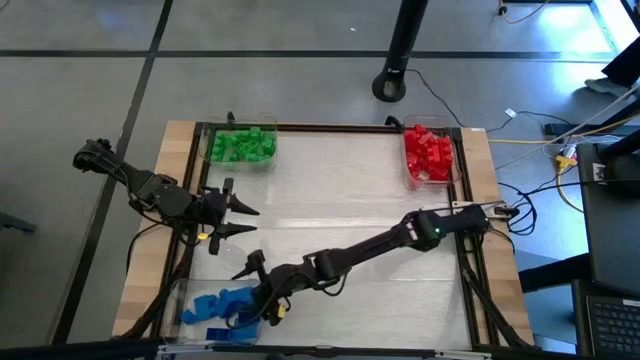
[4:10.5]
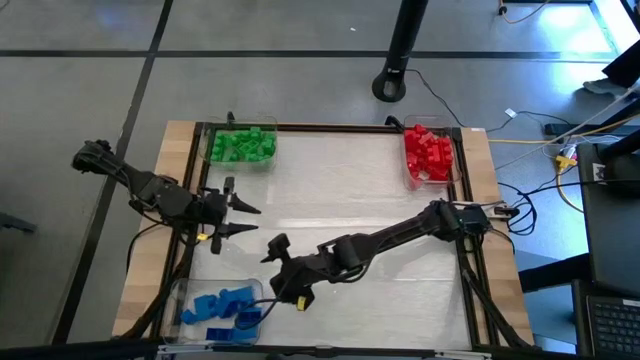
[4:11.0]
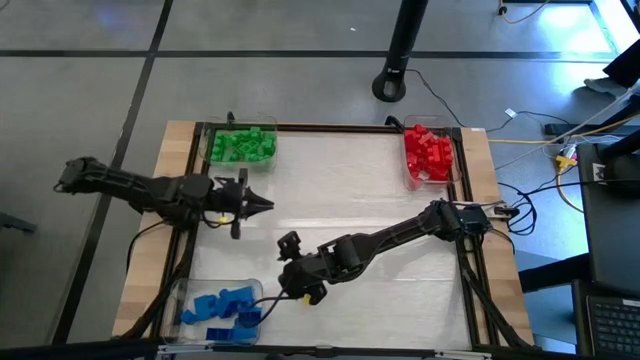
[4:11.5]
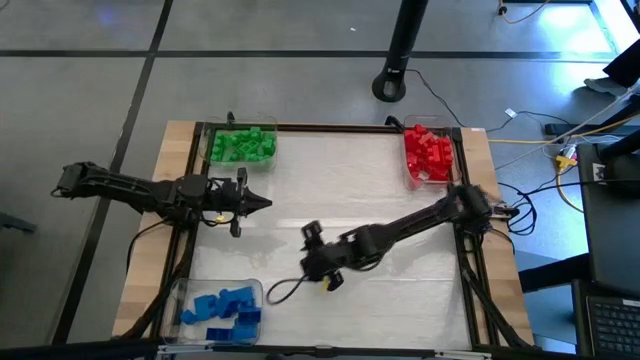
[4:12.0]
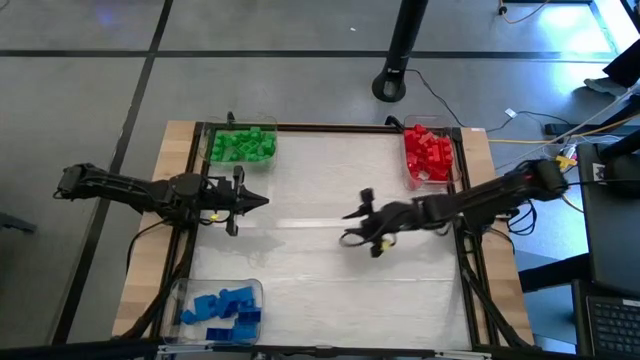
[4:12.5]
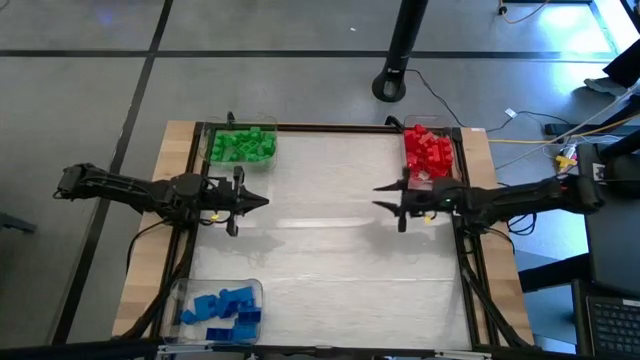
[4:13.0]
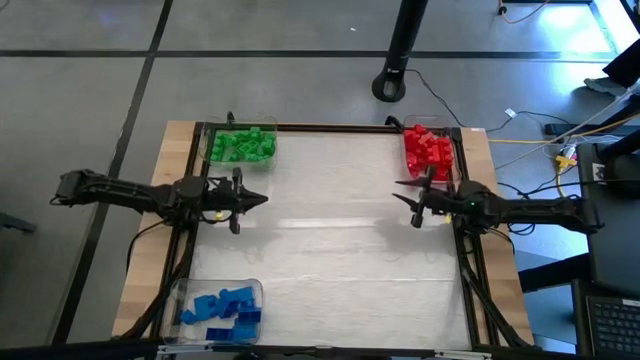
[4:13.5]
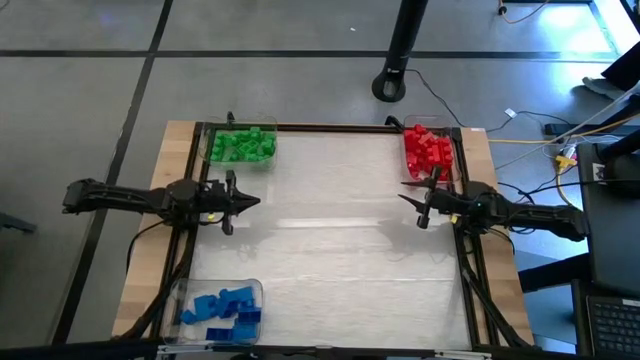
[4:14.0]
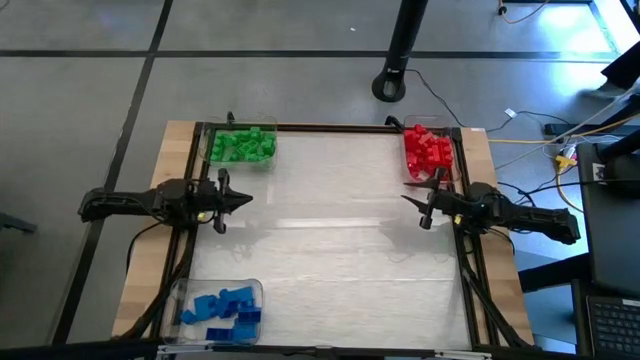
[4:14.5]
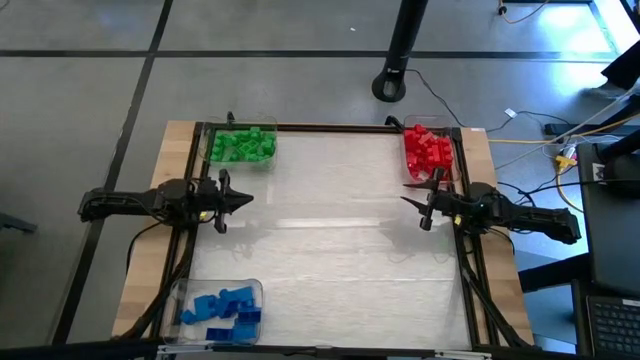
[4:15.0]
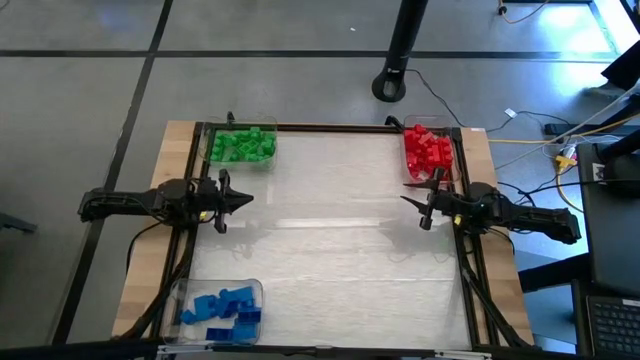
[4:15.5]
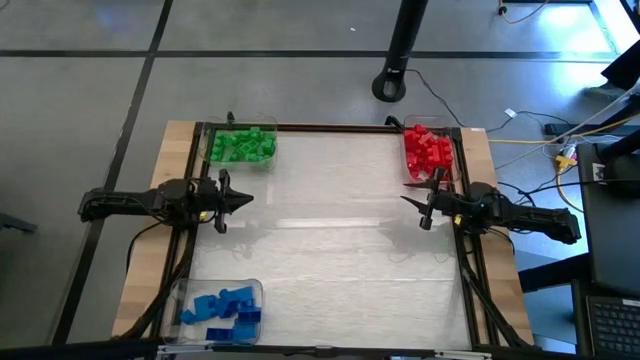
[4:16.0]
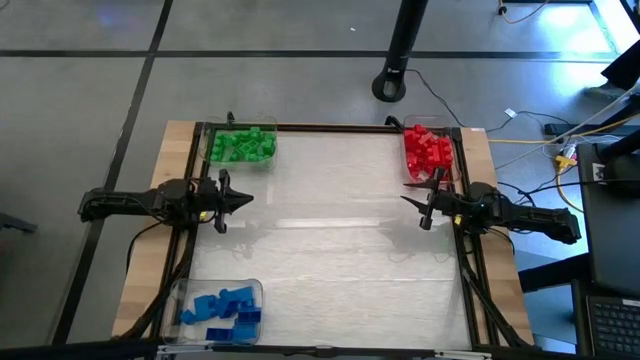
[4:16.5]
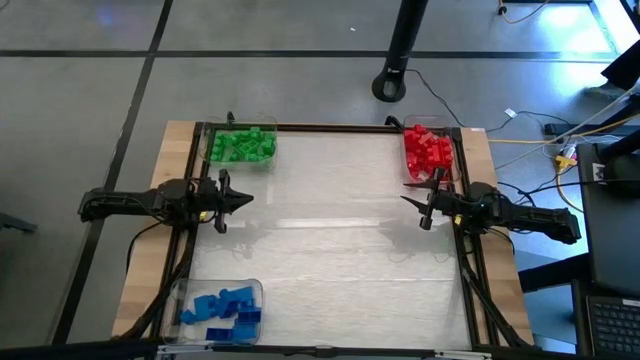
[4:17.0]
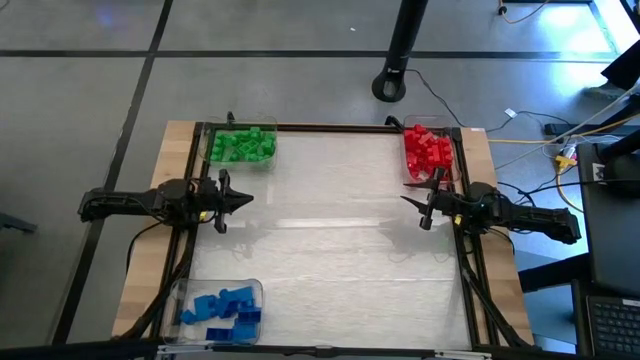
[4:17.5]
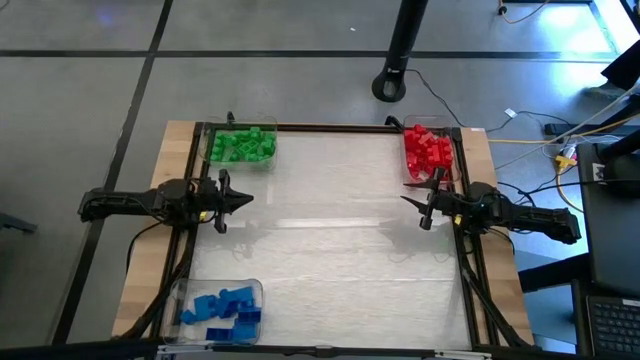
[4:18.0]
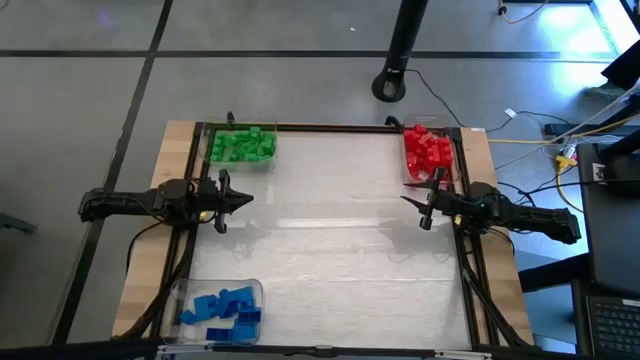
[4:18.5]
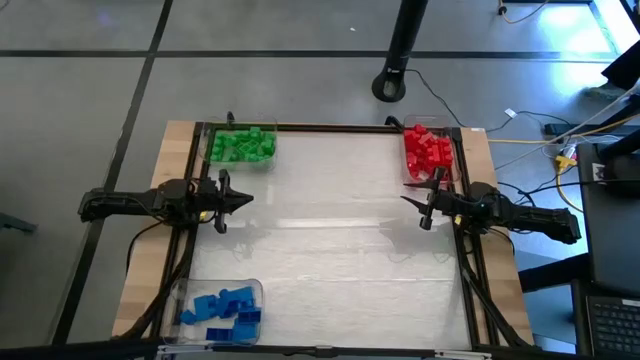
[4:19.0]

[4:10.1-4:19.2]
Task: Sort blocks
Return to Home Position

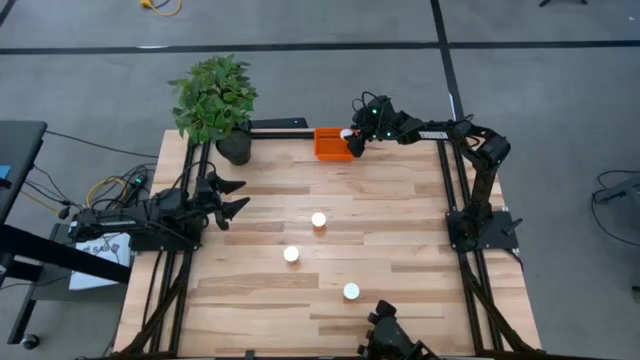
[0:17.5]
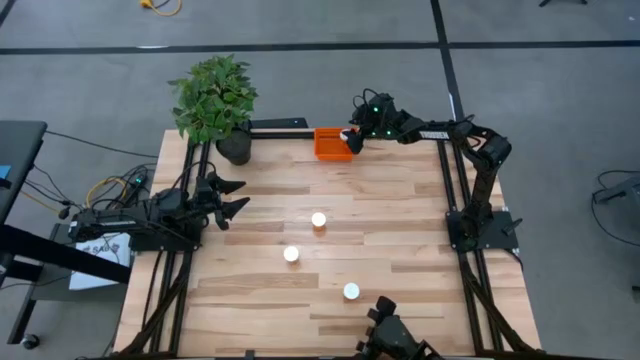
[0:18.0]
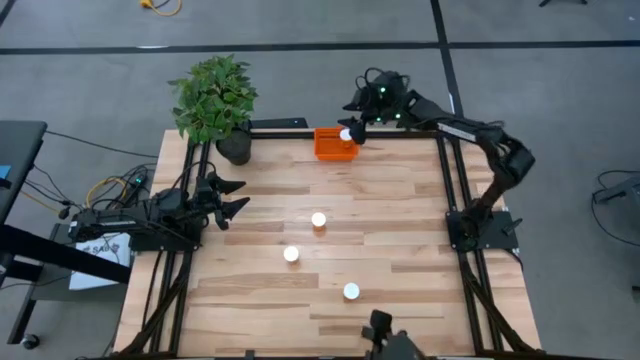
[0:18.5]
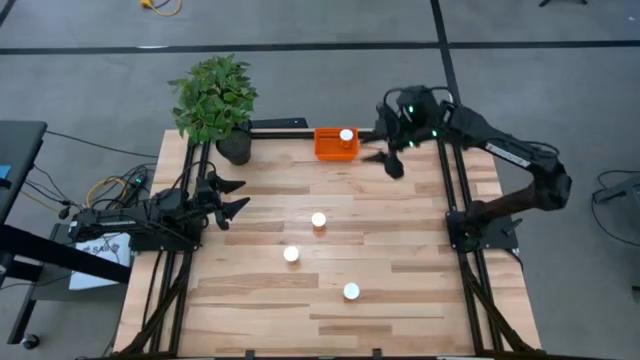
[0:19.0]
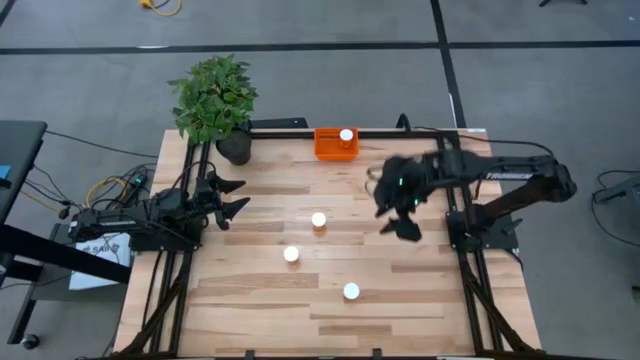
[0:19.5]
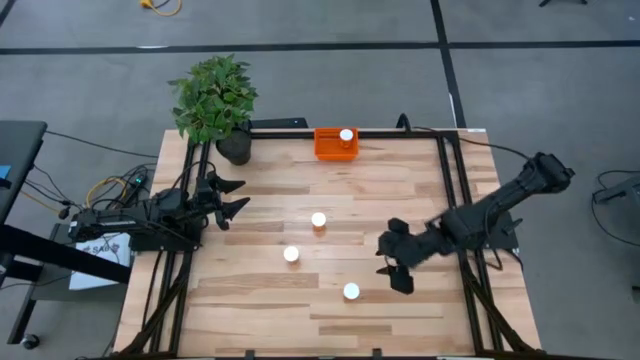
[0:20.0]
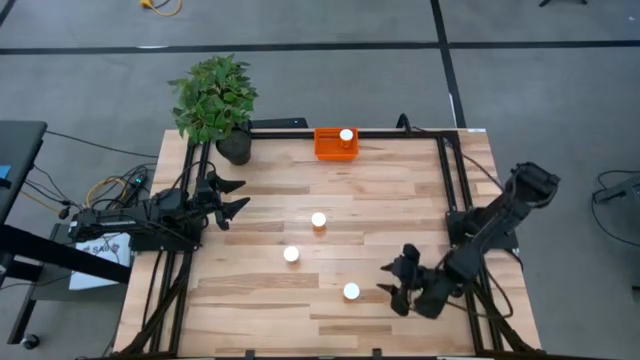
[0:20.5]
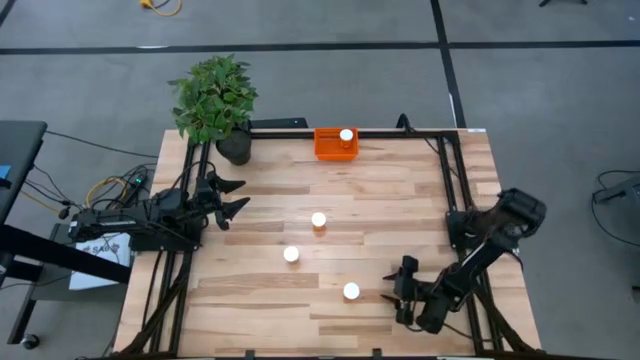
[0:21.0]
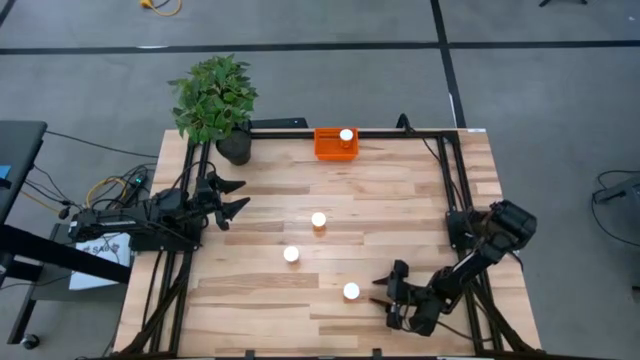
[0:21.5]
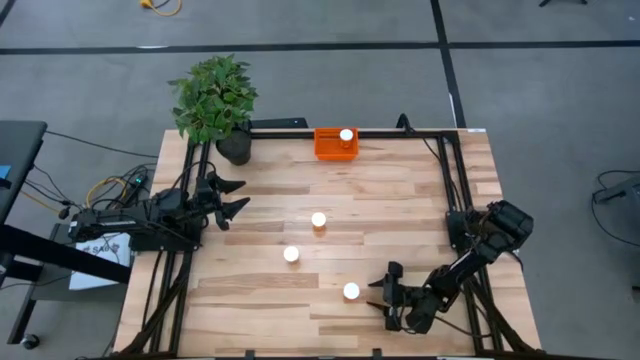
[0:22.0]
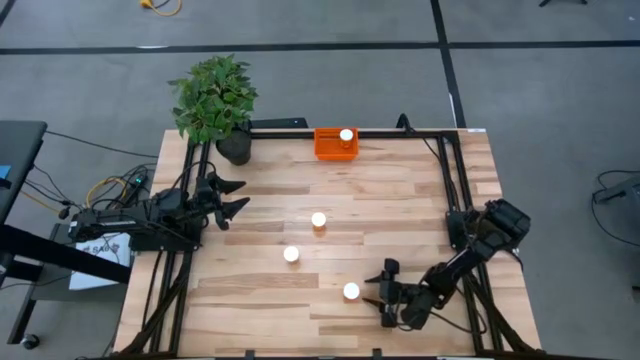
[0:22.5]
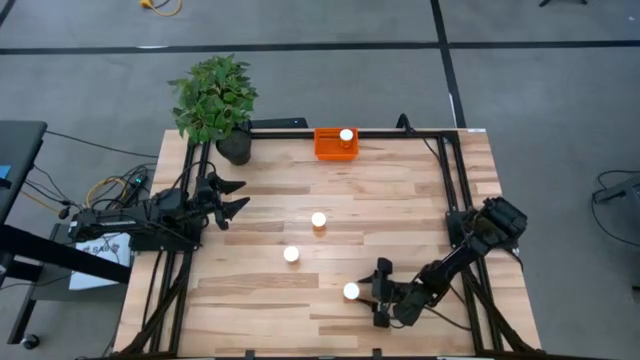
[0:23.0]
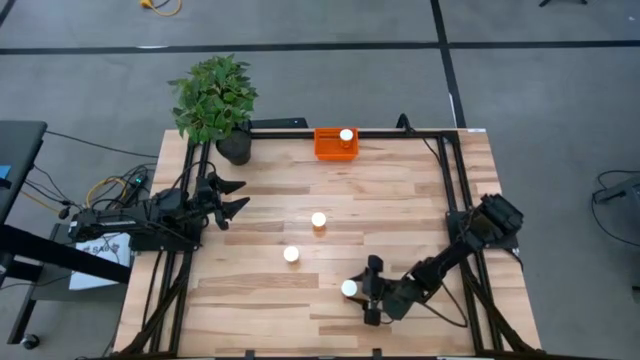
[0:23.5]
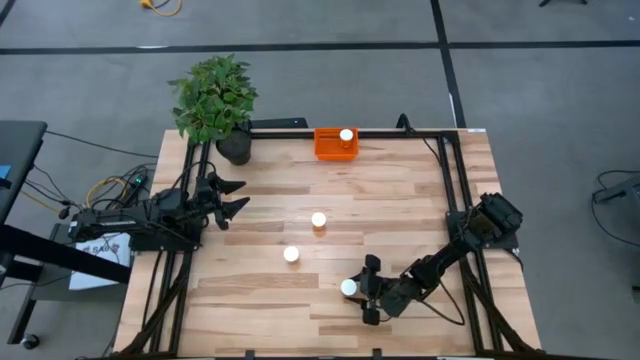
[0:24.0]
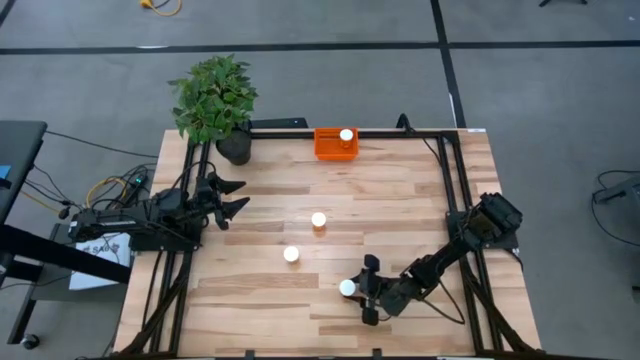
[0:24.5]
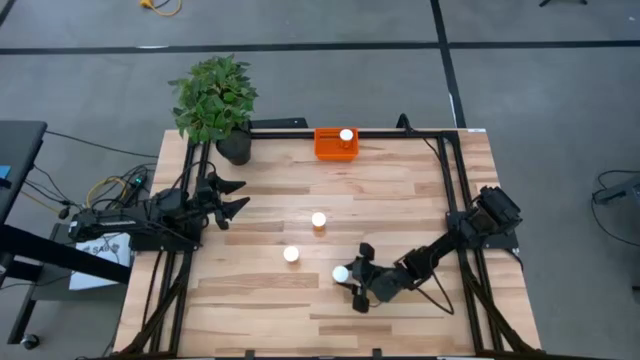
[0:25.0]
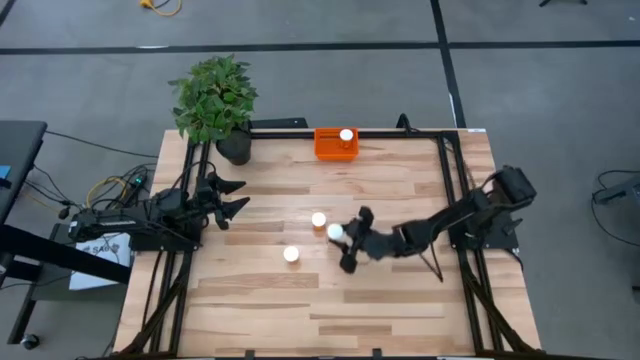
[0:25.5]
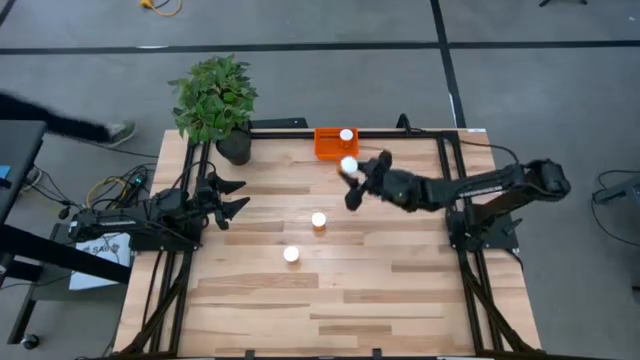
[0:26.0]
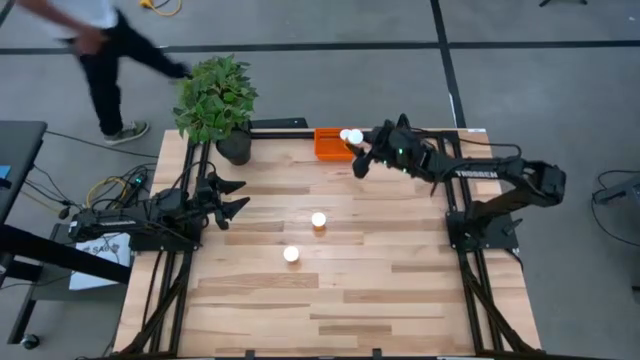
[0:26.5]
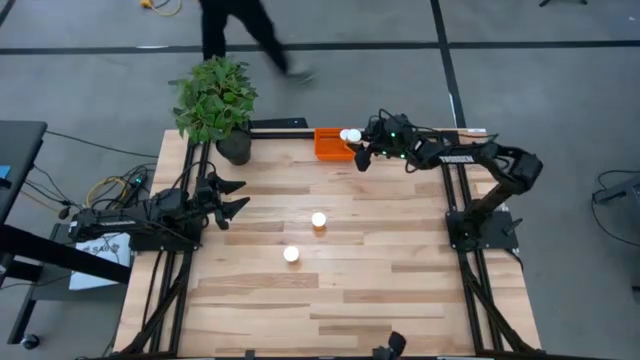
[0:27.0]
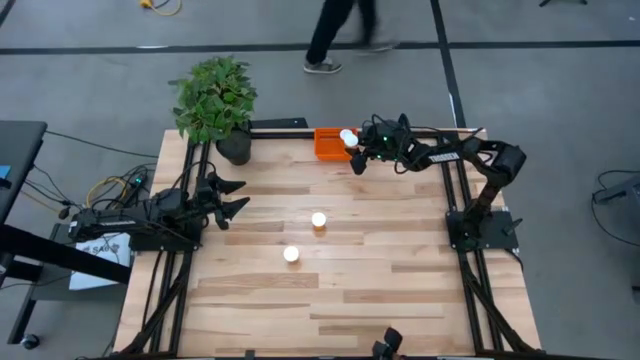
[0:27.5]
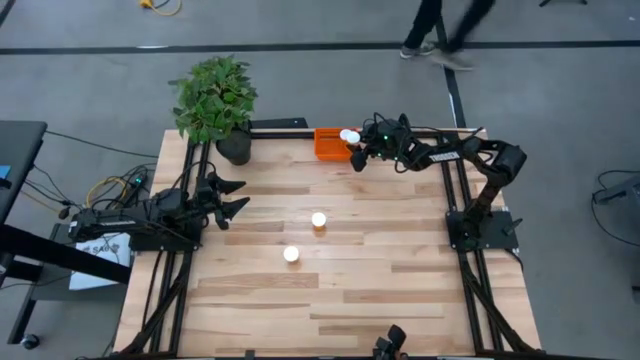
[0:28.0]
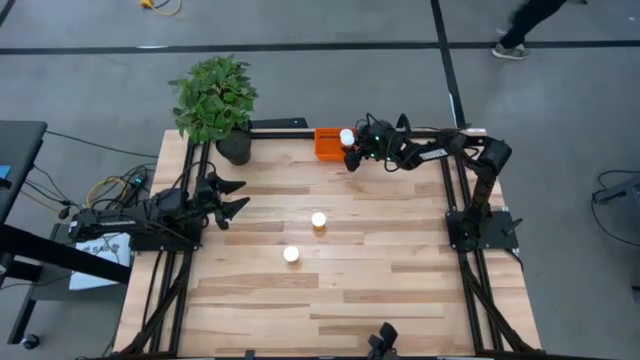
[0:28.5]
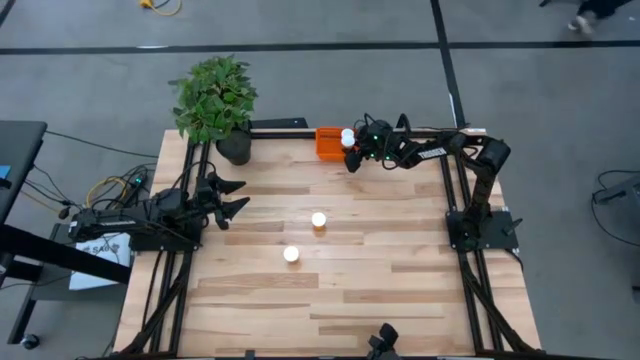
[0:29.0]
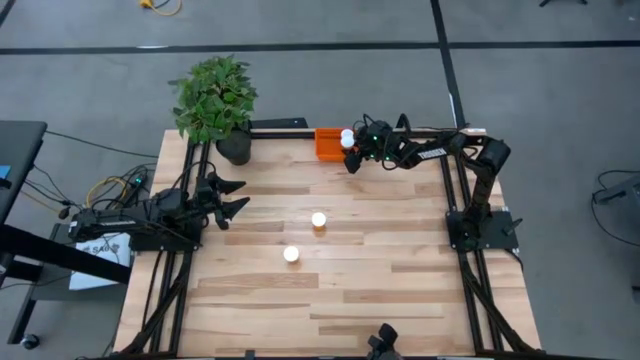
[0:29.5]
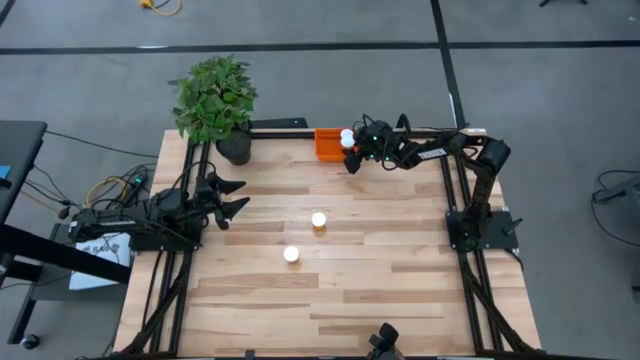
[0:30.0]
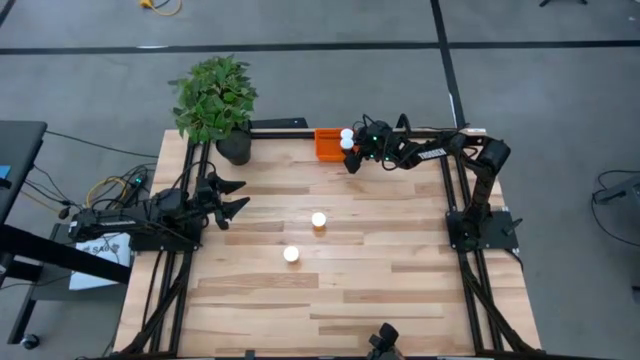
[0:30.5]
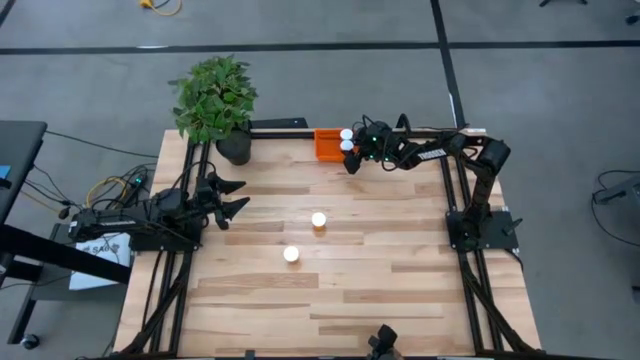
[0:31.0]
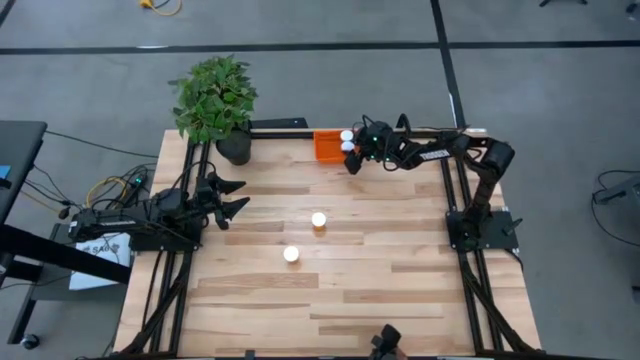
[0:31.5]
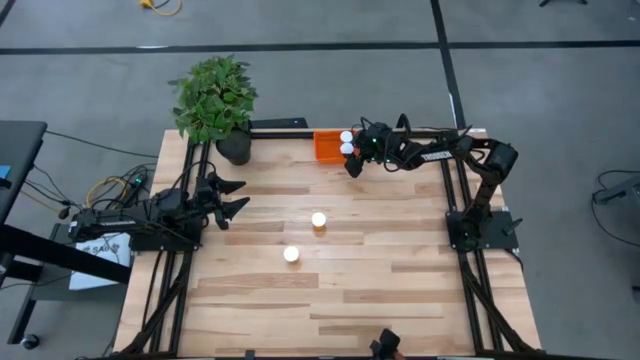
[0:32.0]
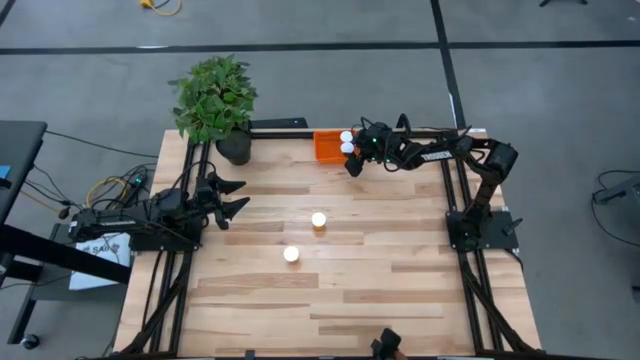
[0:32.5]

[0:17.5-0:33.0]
Task: Pick and place pill bottles into a basket
Put the orange pill bottle into the orange bin
